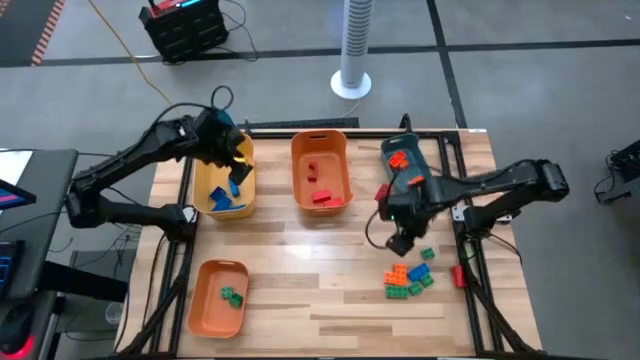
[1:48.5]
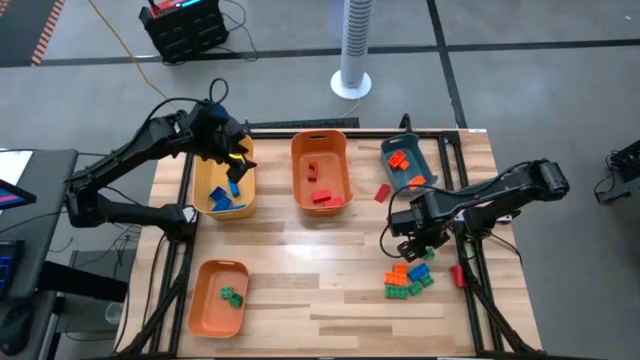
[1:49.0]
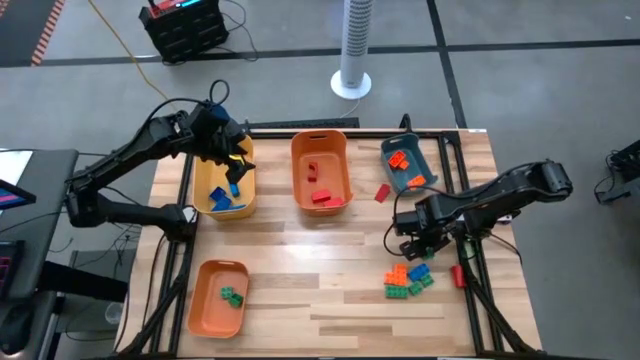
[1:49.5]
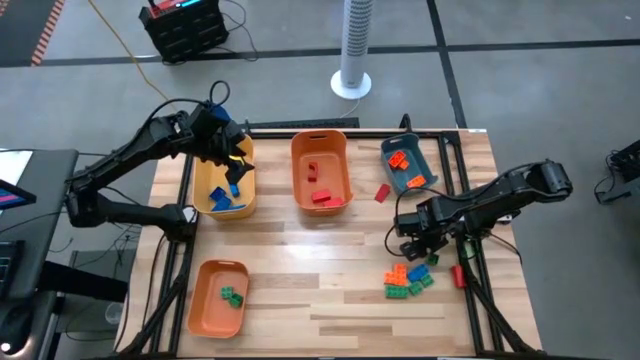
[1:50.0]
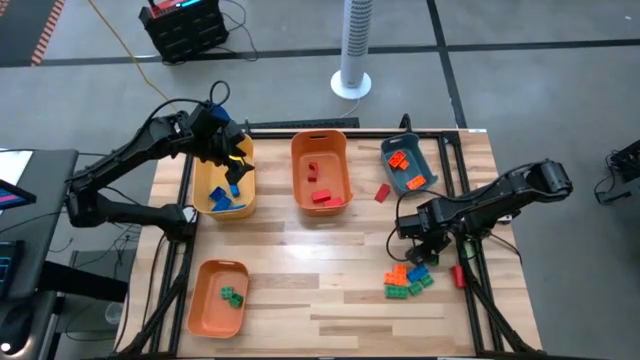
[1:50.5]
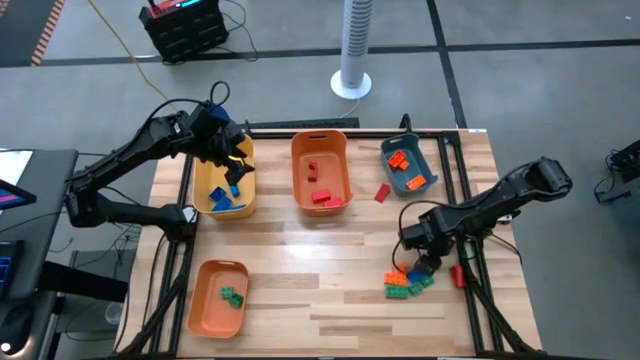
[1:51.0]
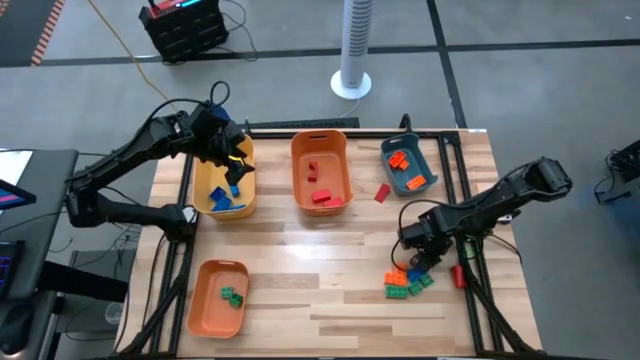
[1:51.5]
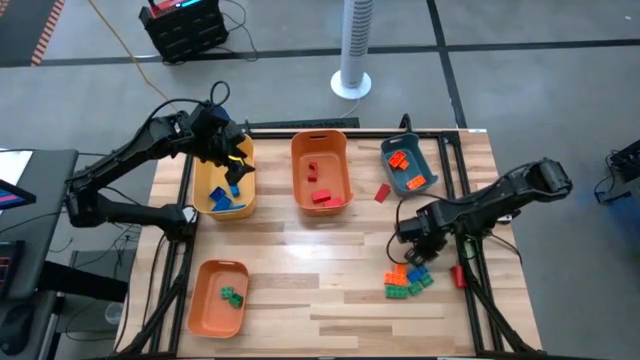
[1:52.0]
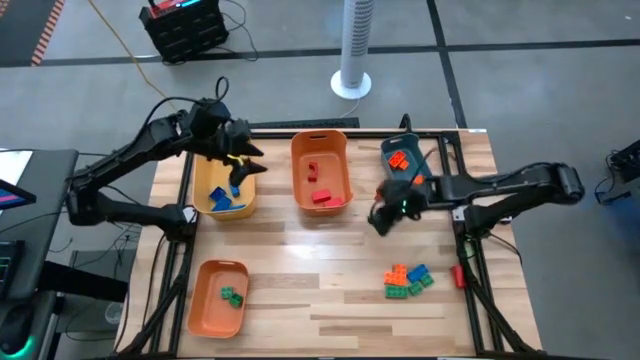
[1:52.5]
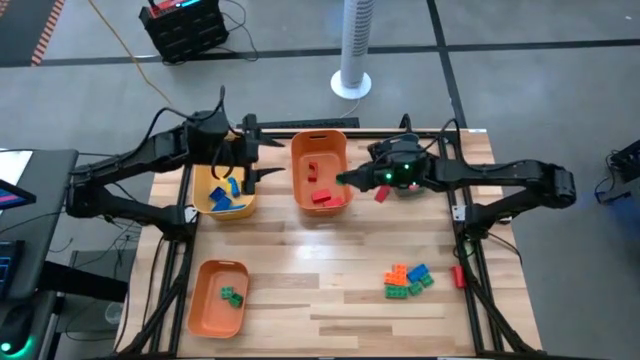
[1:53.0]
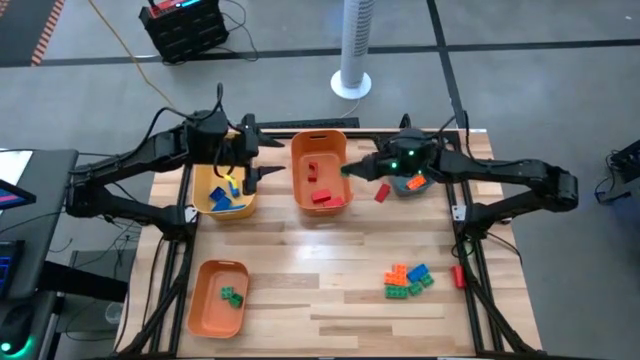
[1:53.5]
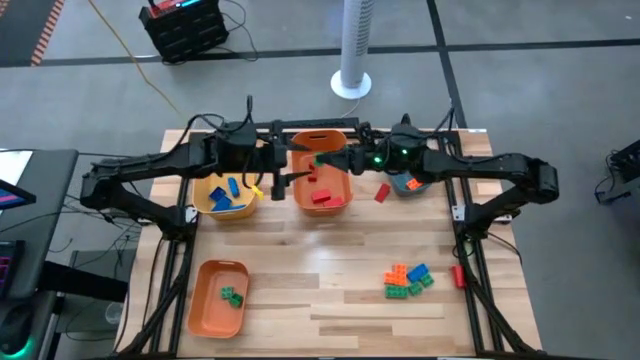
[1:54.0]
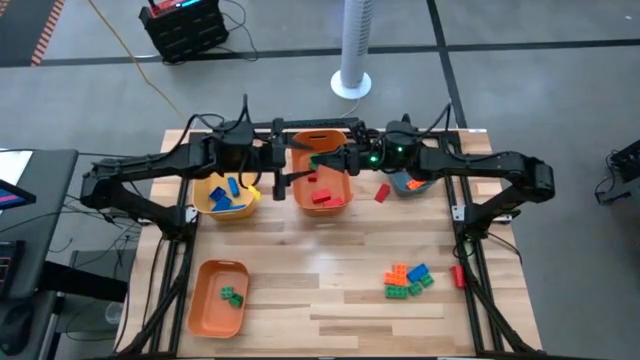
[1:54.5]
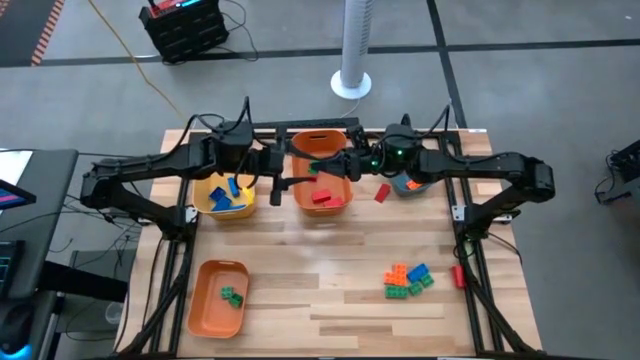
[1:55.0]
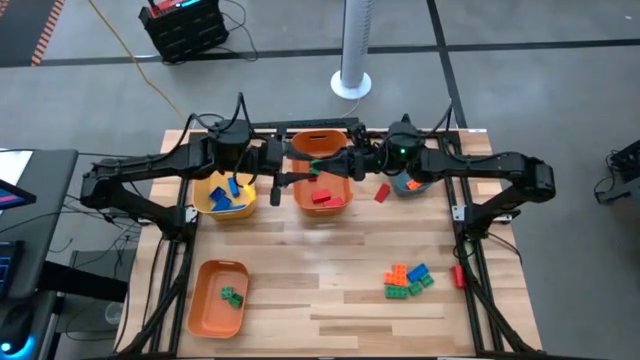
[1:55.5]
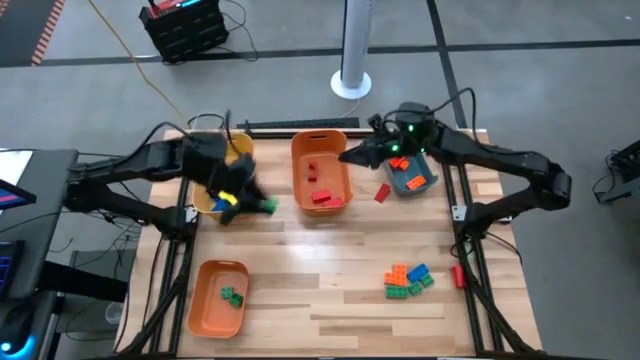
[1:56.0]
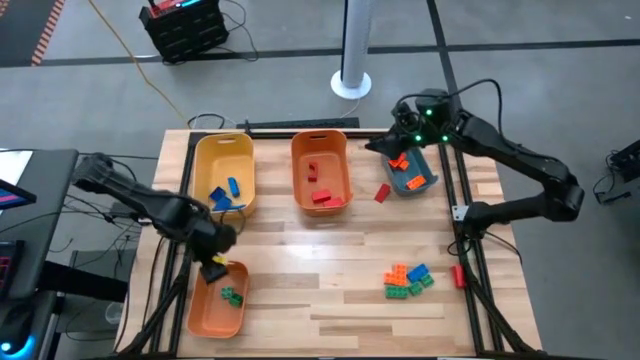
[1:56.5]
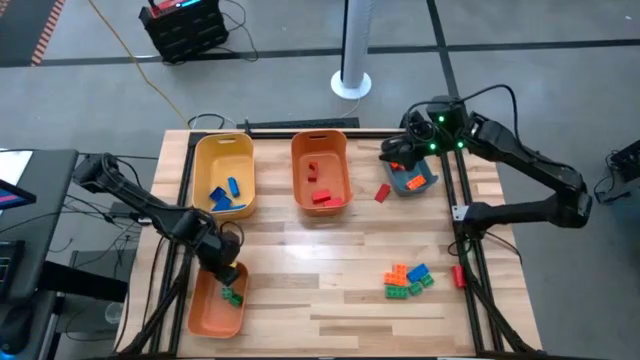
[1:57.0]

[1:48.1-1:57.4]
Task: Sort blocks
Put the green game piece into the bottom orange bin

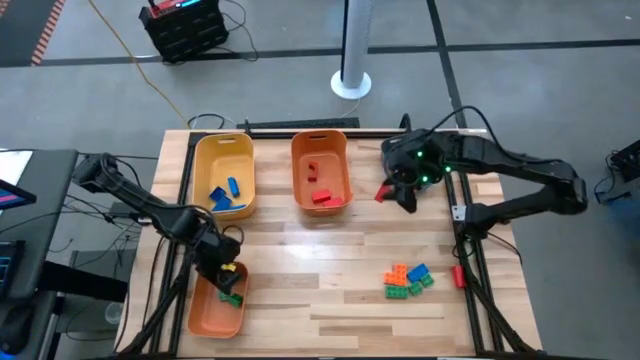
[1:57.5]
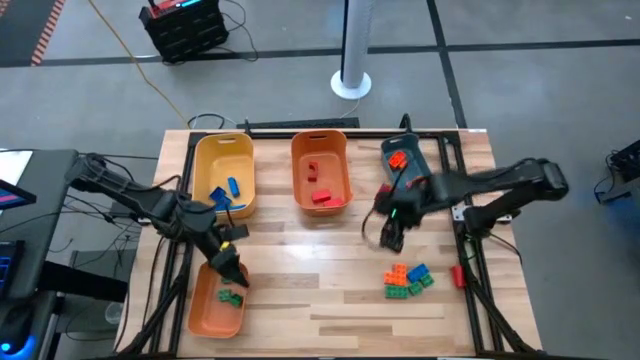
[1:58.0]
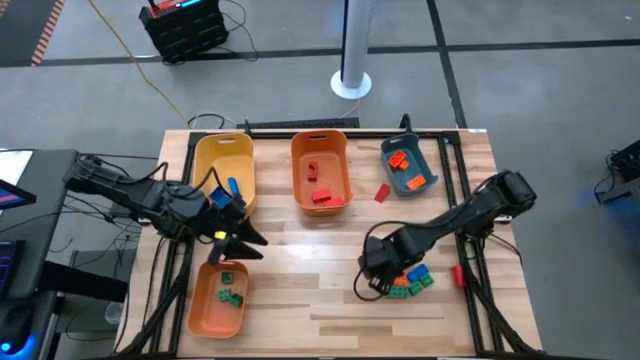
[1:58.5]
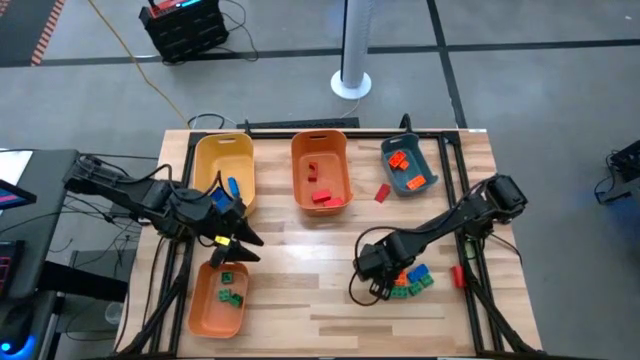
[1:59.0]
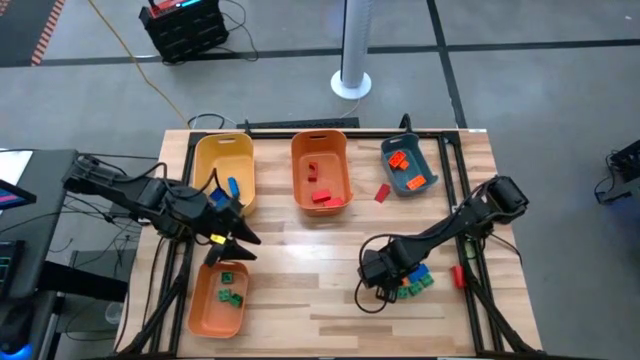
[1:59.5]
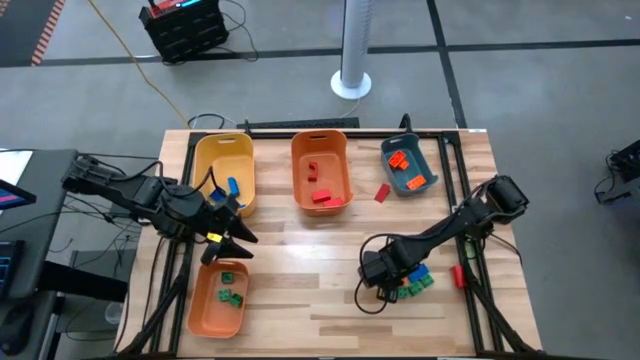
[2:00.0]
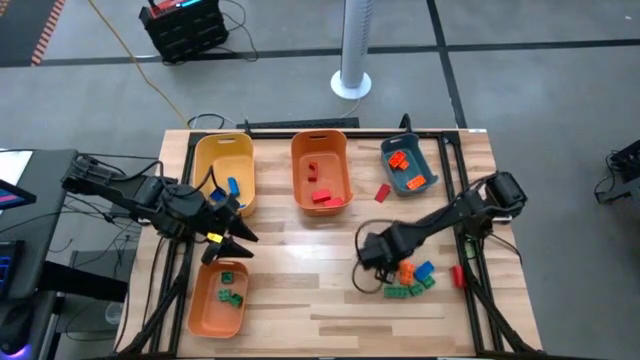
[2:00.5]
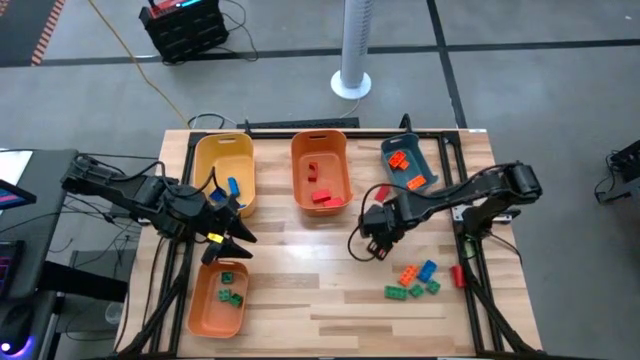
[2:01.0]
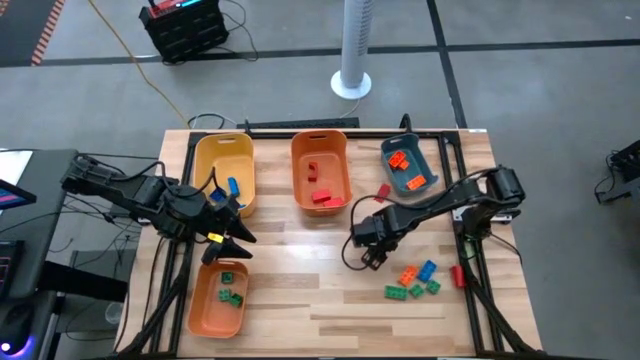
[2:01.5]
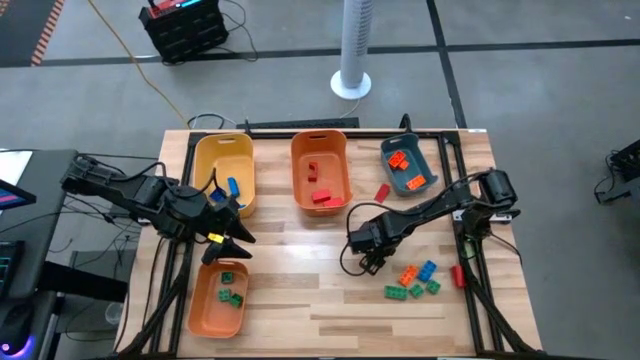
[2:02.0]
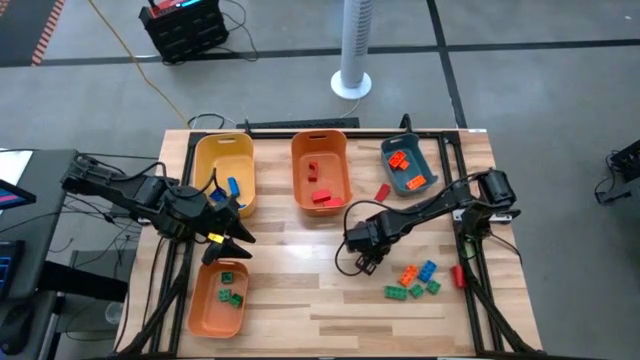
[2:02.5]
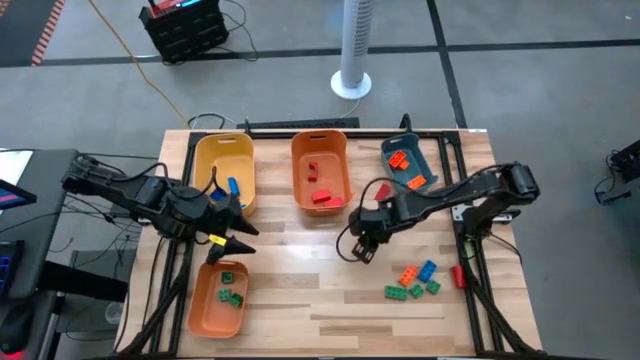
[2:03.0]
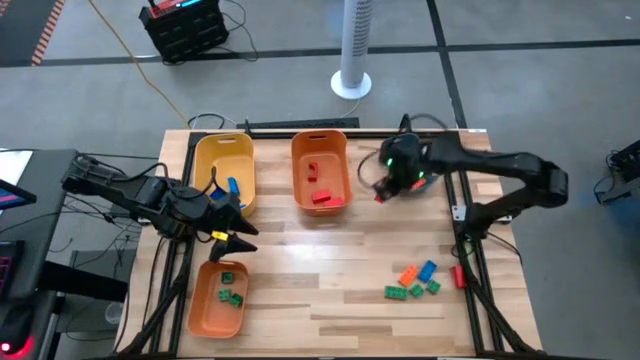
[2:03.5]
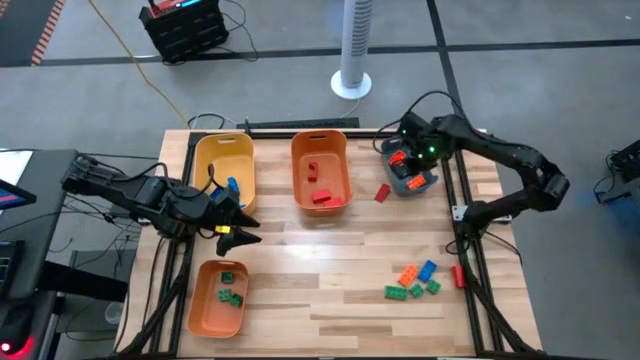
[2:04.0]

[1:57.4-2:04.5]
Put the orange game piece into the blue bin

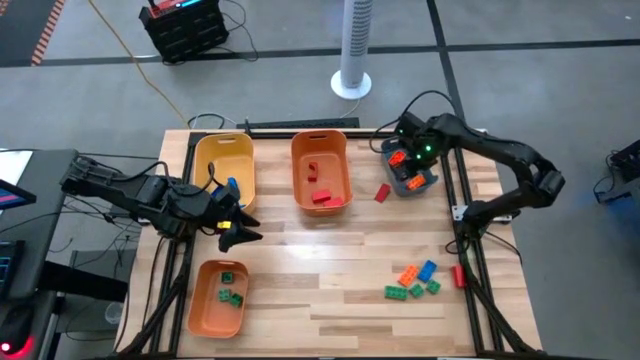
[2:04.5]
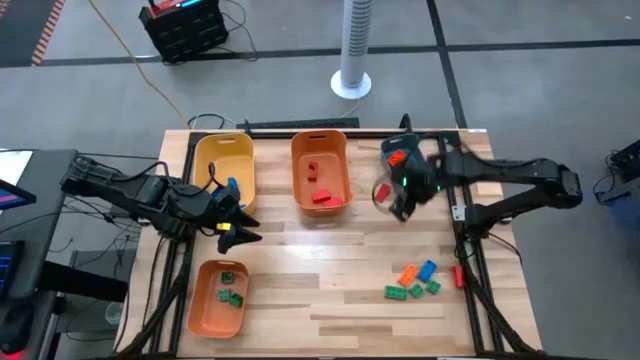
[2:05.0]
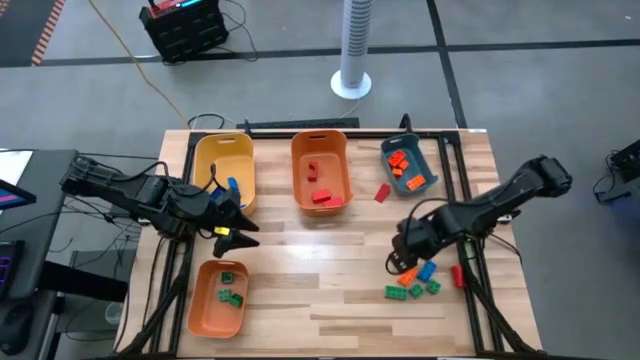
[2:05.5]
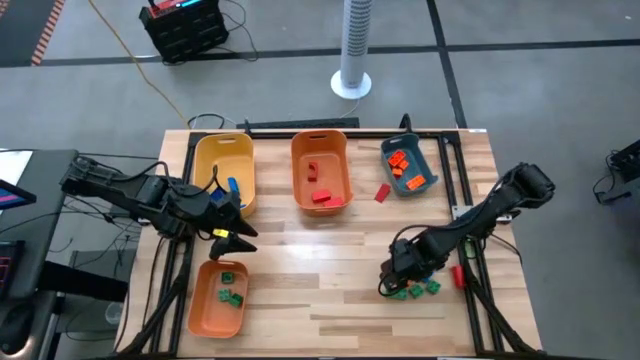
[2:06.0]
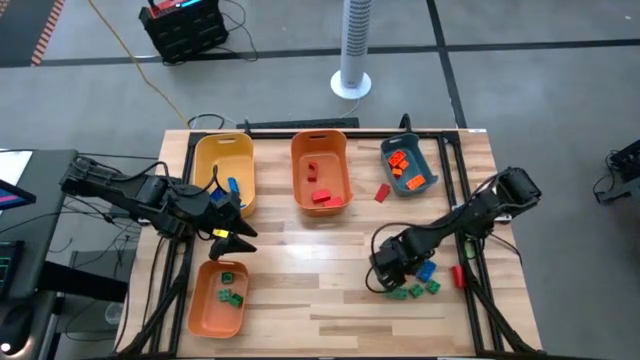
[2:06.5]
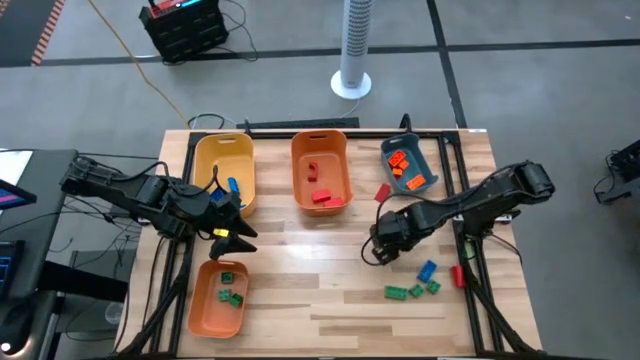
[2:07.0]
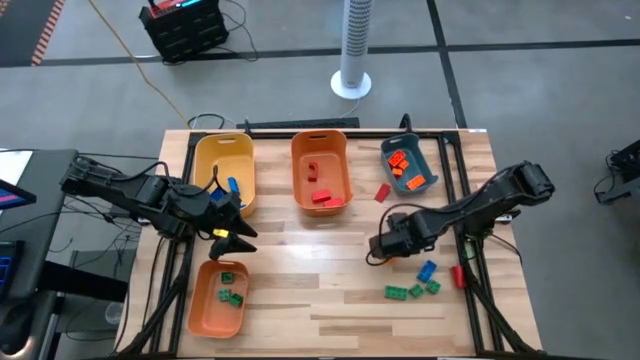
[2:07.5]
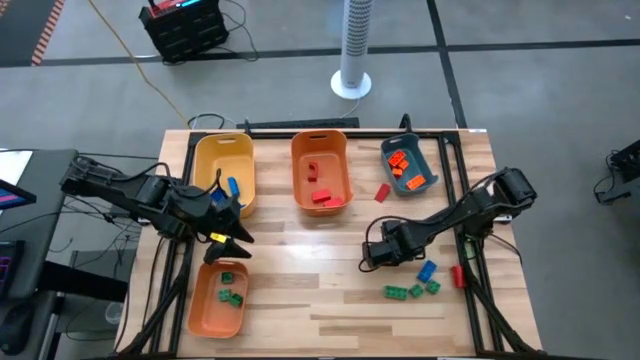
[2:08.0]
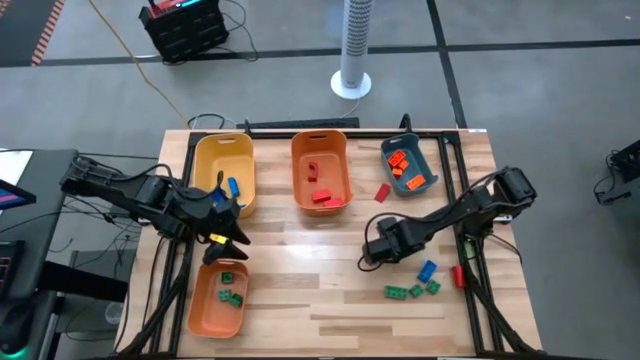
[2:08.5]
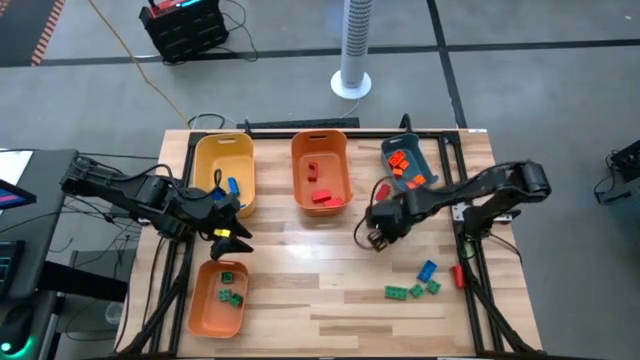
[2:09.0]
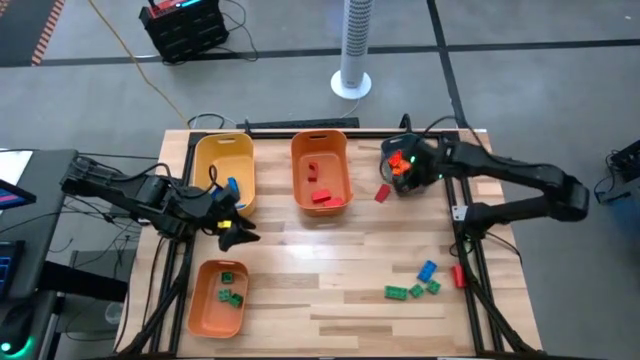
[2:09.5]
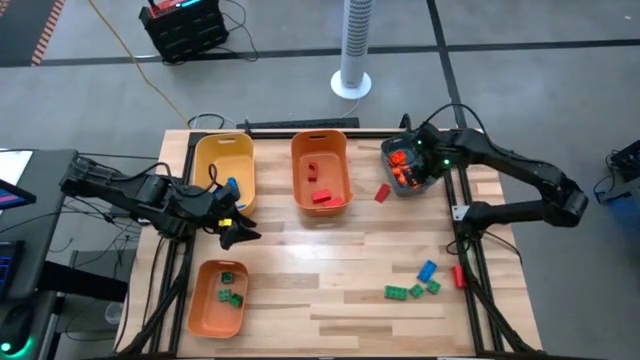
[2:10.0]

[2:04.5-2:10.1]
Put the orange game piece into the blue bin
